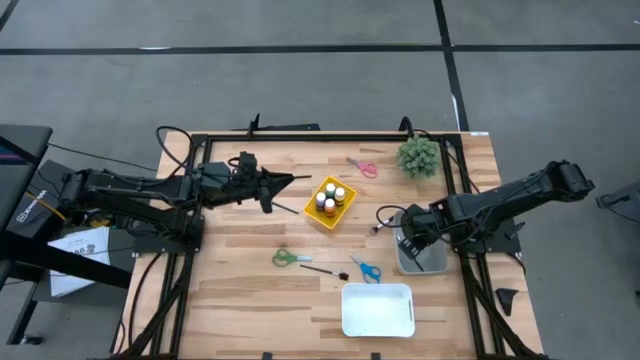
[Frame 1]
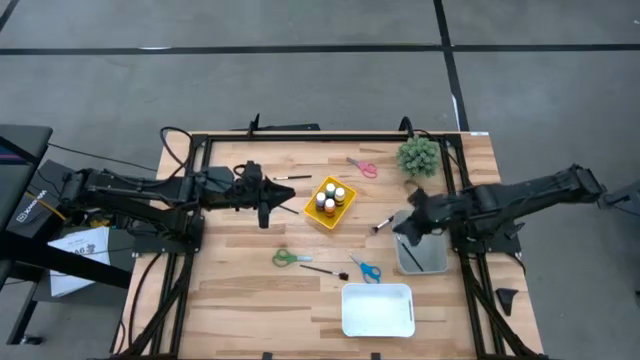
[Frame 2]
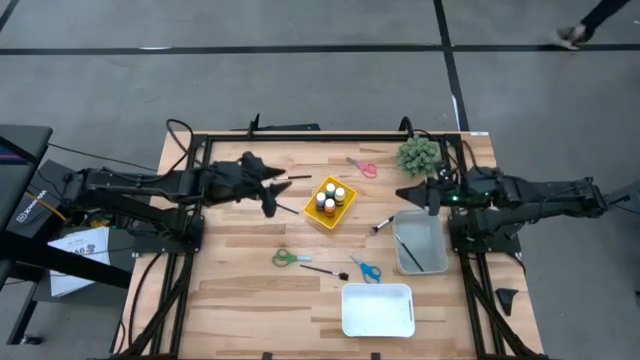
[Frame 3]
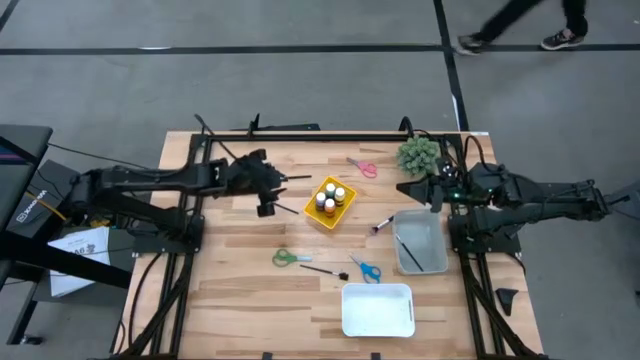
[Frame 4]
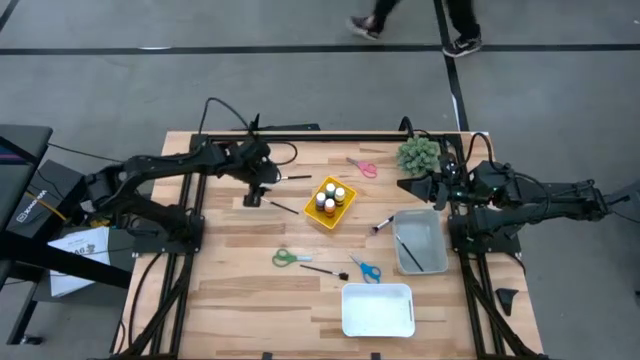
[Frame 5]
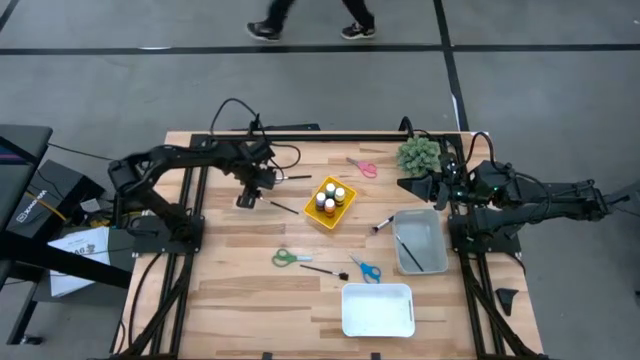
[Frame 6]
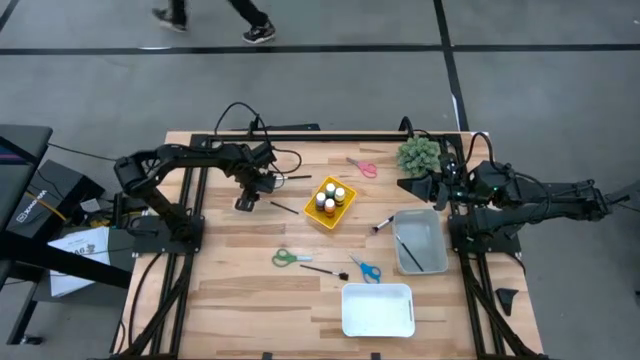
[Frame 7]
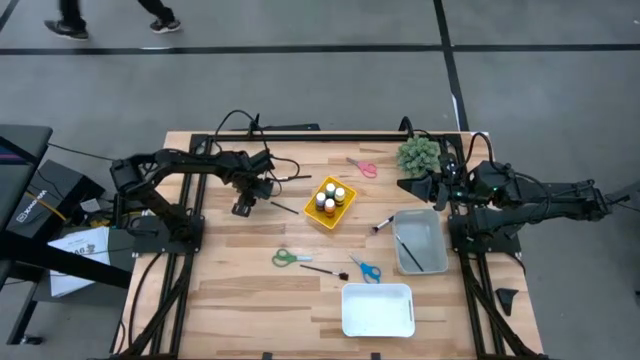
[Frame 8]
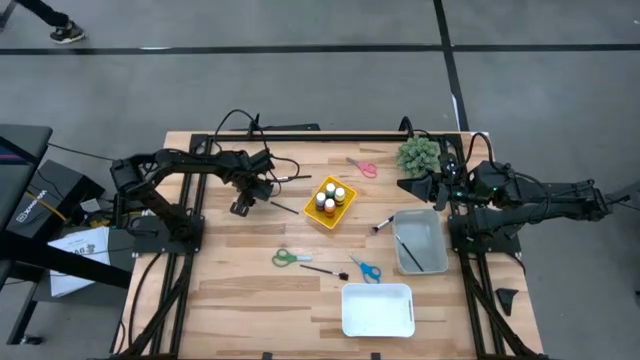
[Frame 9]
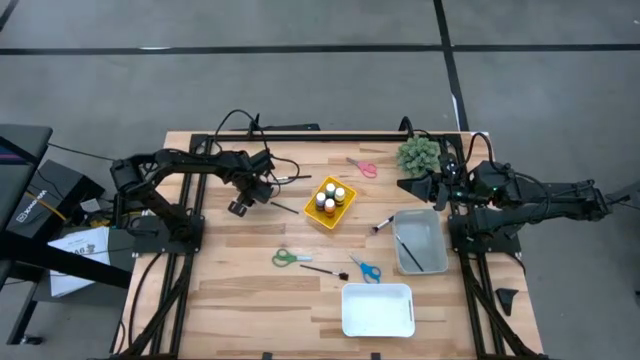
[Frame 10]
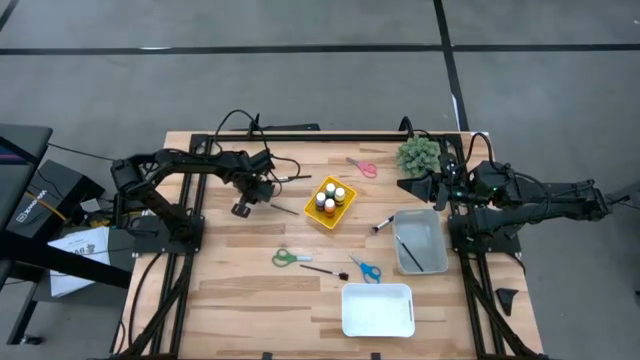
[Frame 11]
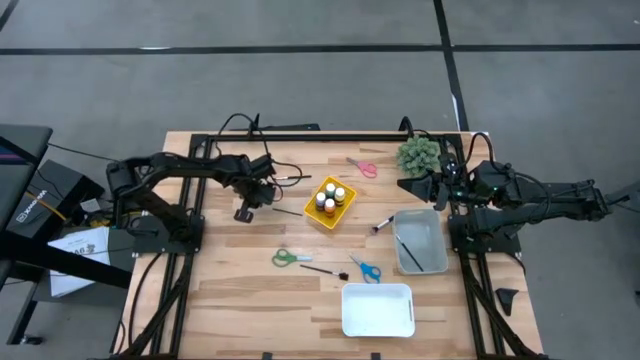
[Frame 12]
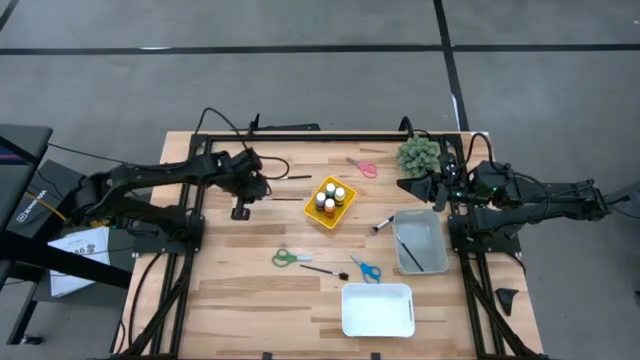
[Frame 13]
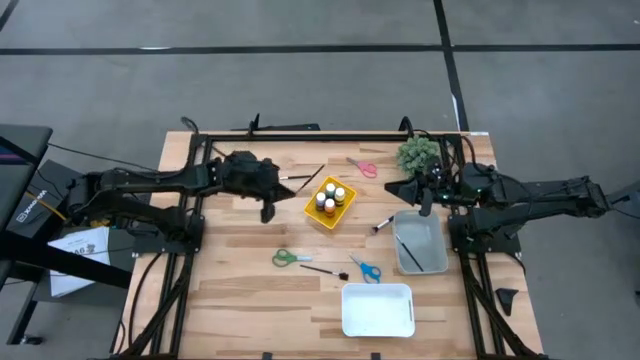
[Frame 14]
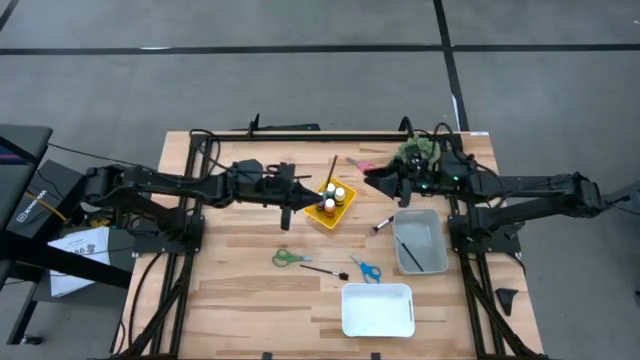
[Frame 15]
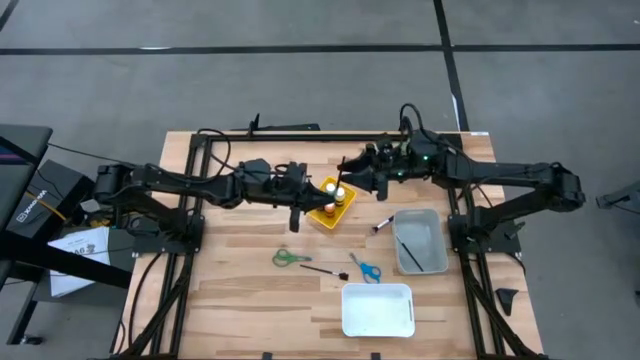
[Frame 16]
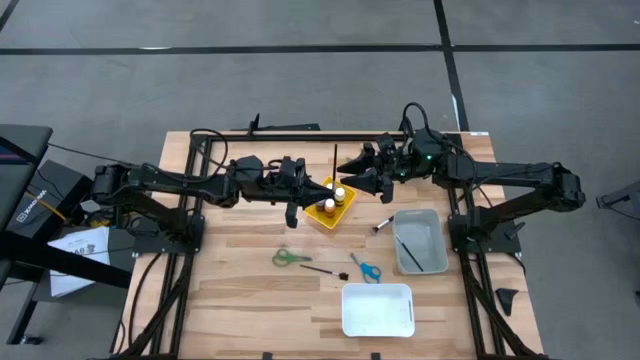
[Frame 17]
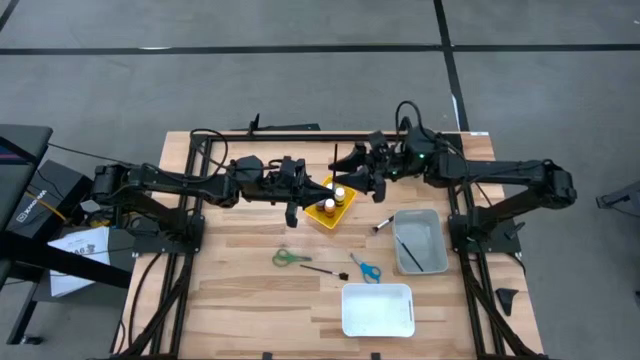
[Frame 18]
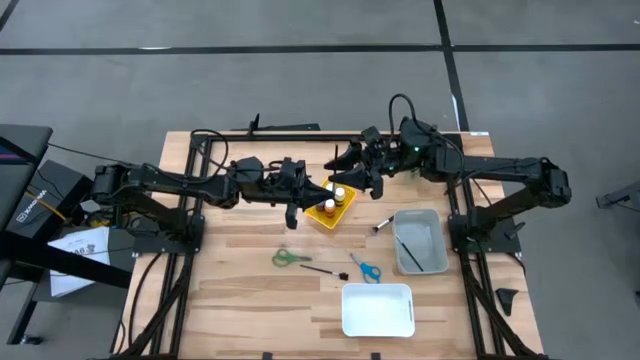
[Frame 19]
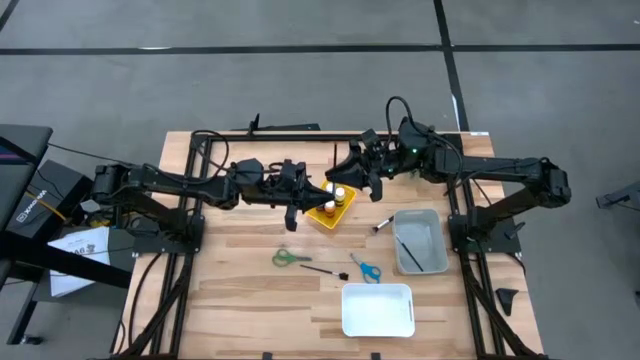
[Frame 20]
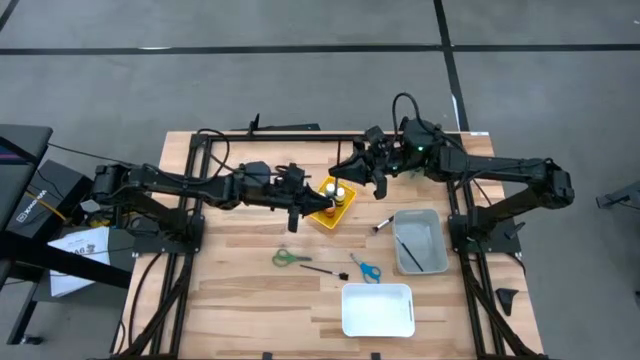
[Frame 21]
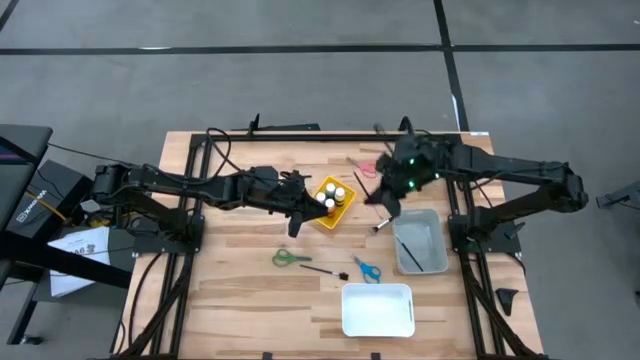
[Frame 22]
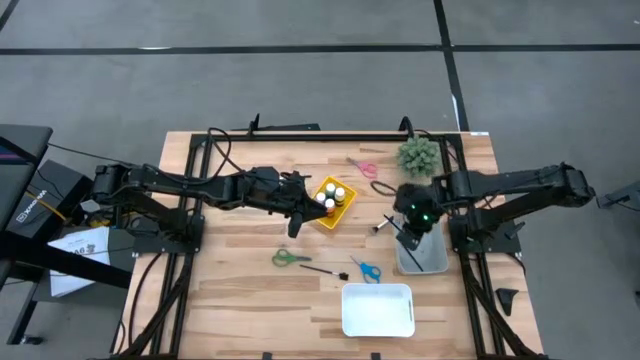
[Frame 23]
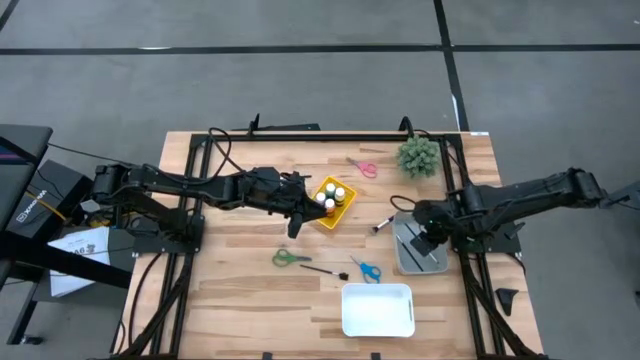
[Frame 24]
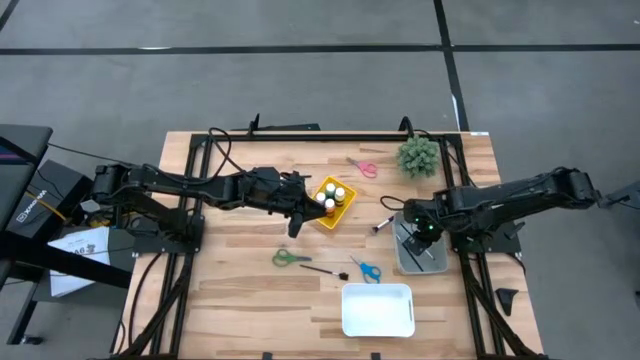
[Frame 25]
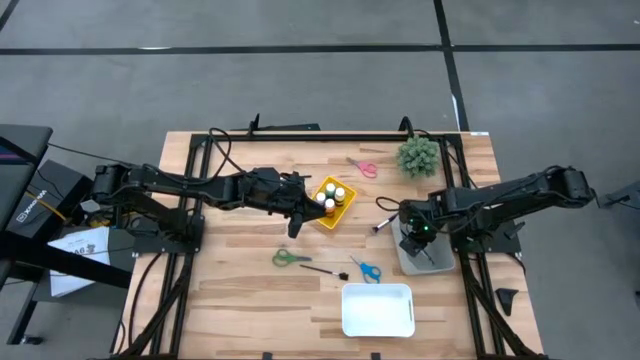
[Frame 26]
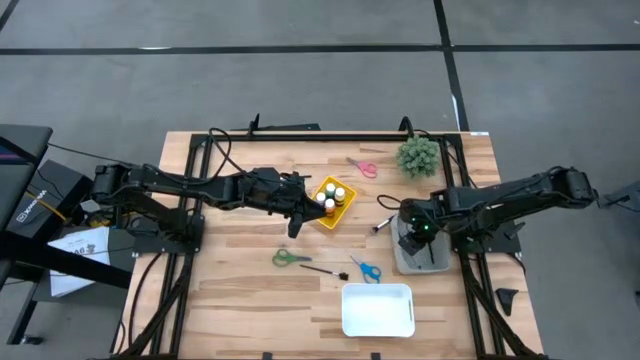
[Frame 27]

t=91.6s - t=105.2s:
Task: Pick & Place Paint Supplies
Put the bottom black eyeshadow brush into the gray bin

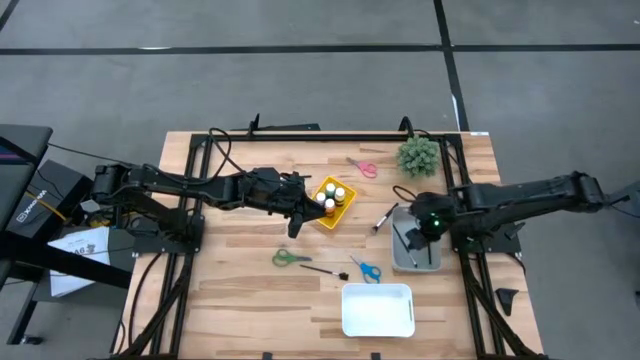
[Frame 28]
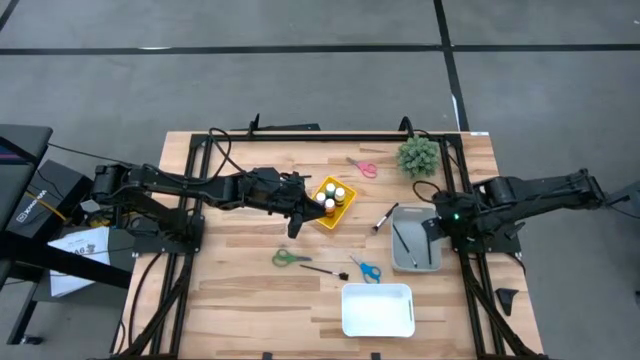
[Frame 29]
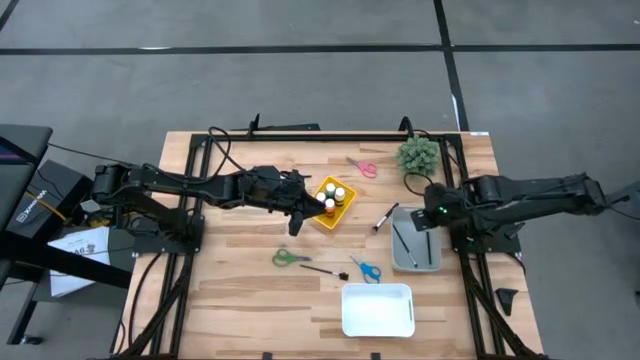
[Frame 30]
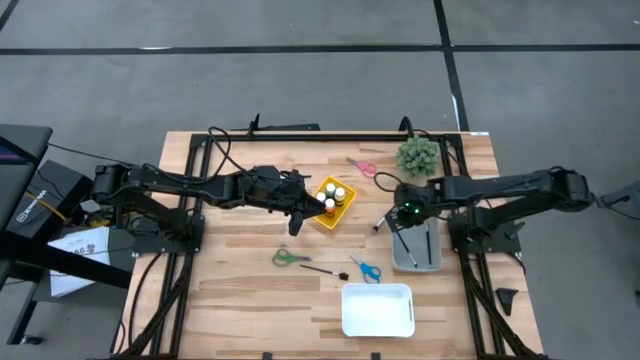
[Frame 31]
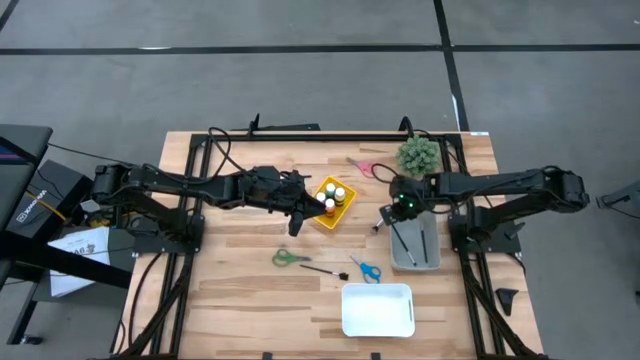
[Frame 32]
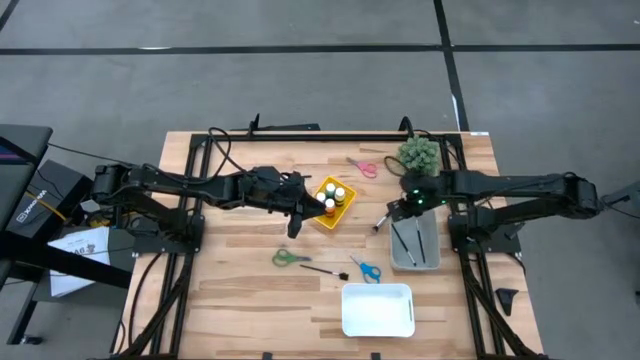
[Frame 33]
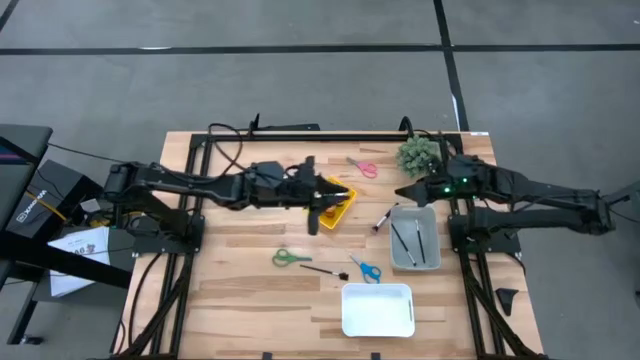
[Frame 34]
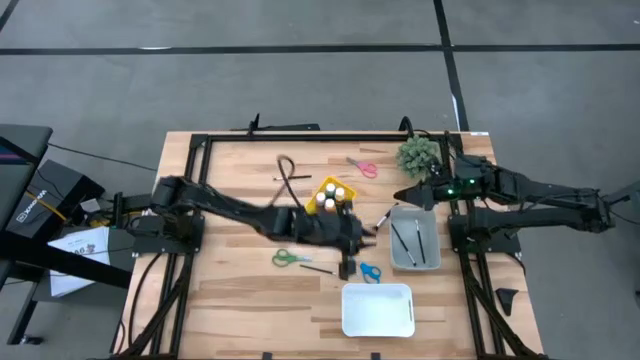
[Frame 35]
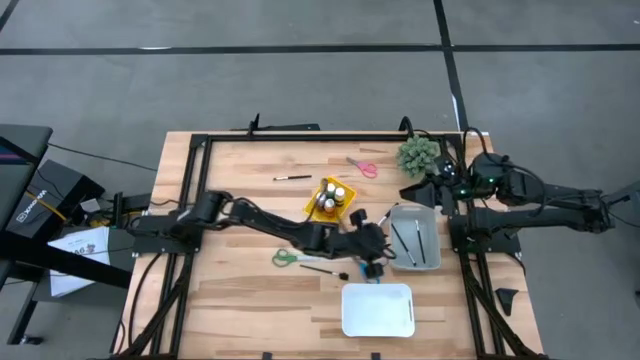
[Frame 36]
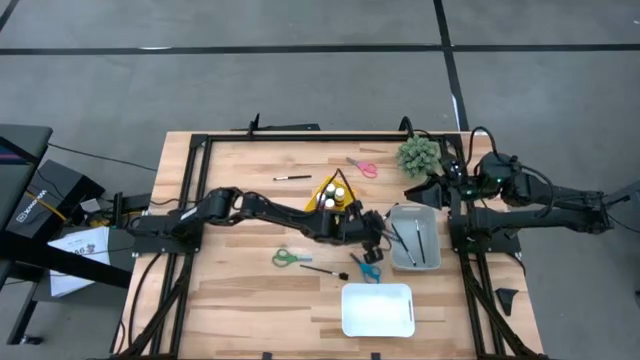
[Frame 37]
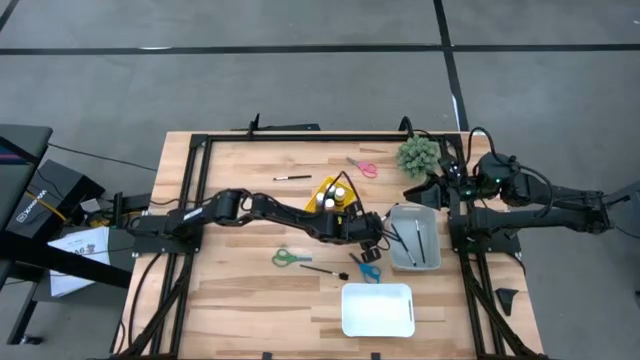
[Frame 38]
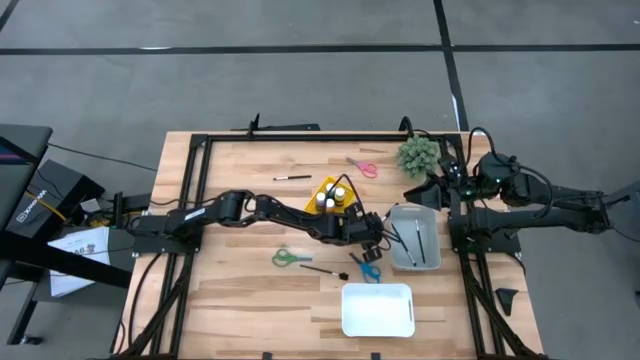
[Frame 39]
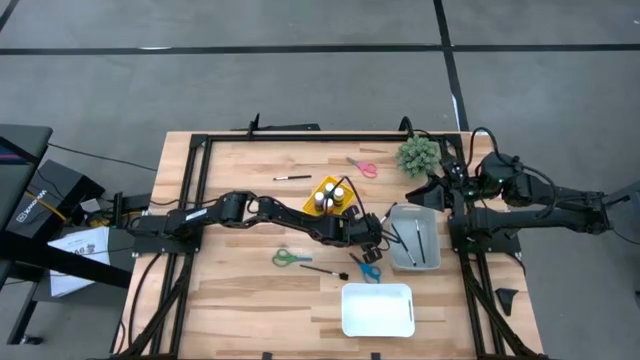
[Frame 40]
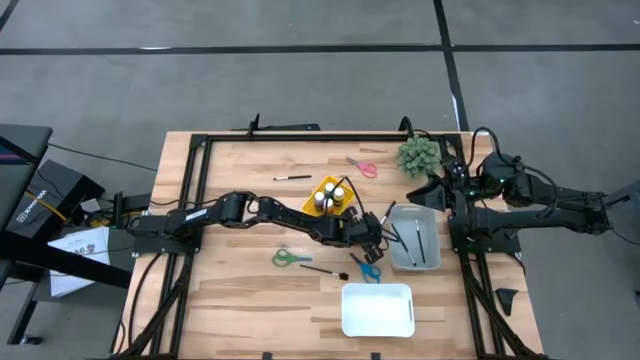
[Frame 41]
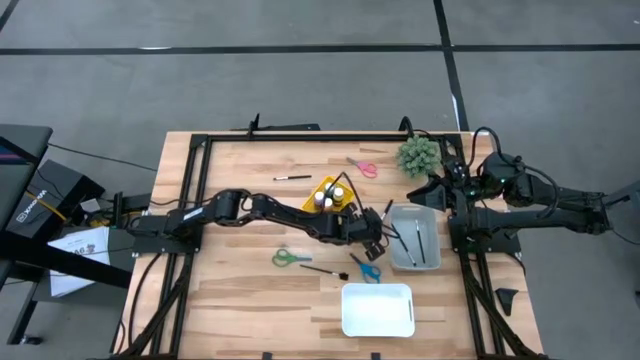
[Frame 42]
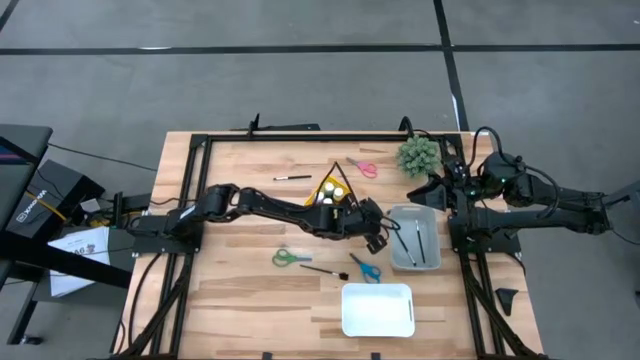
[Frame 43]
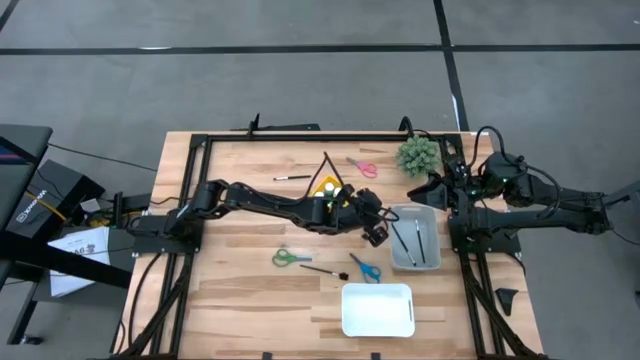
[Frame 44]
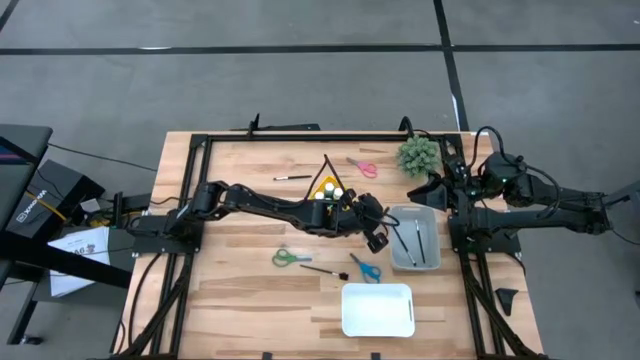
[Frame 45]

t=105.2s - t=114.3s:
Put the black powder brush into the gray bin
